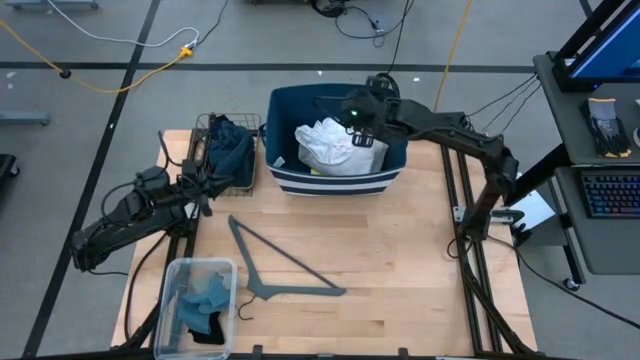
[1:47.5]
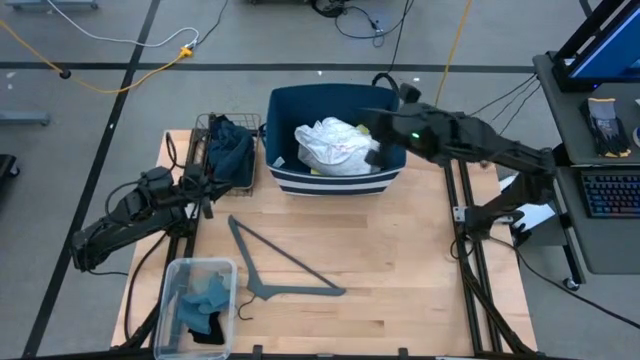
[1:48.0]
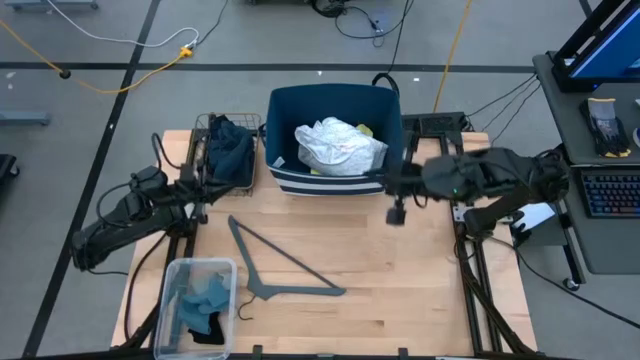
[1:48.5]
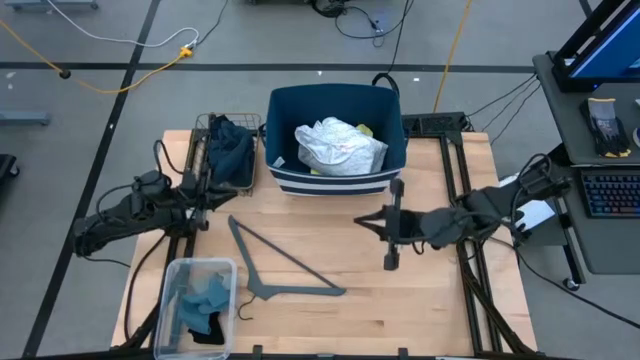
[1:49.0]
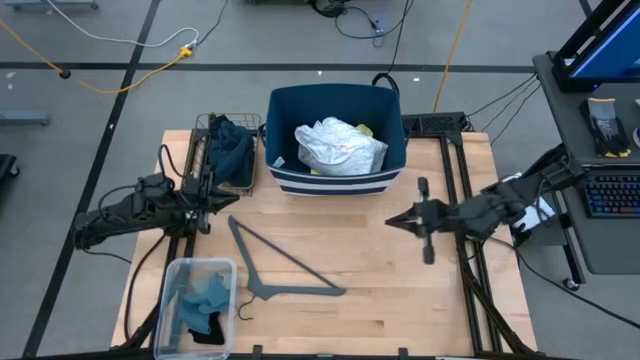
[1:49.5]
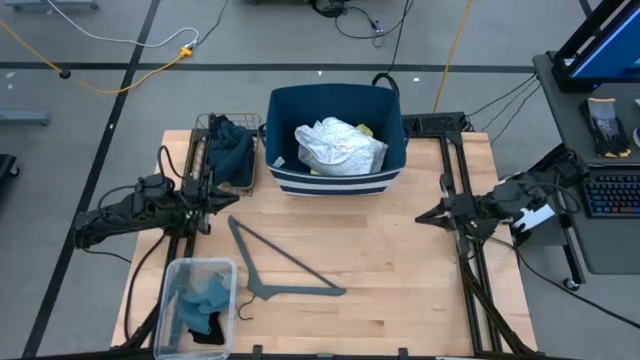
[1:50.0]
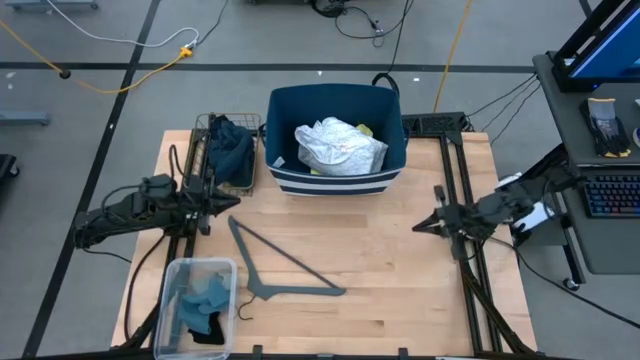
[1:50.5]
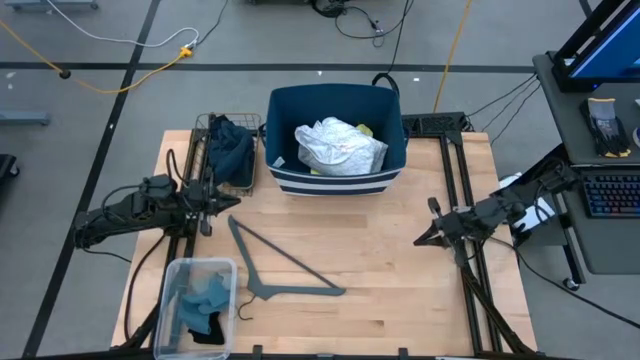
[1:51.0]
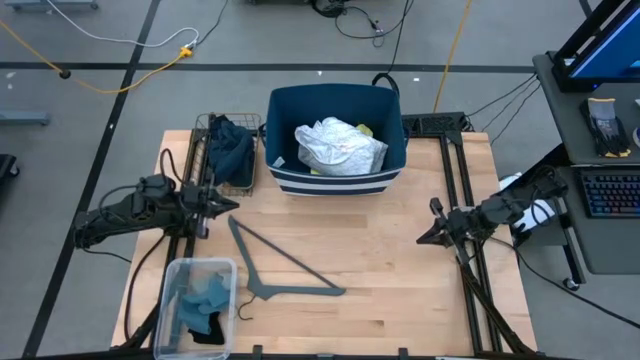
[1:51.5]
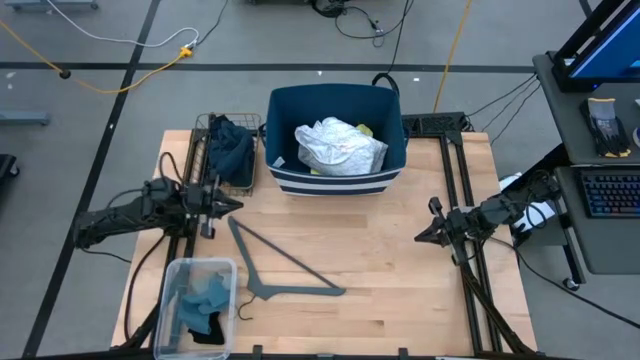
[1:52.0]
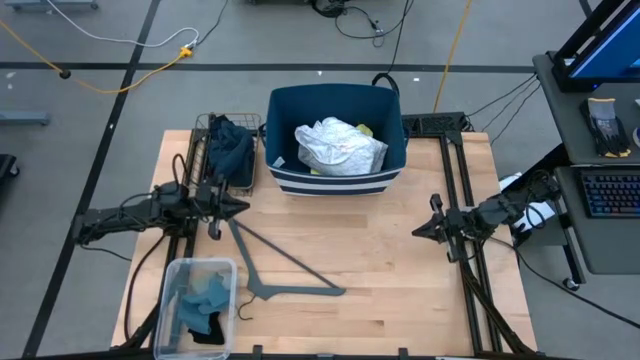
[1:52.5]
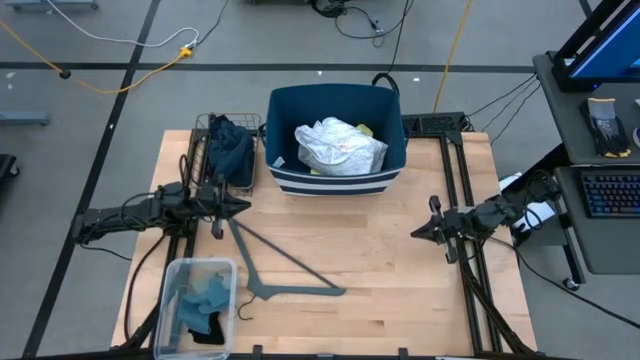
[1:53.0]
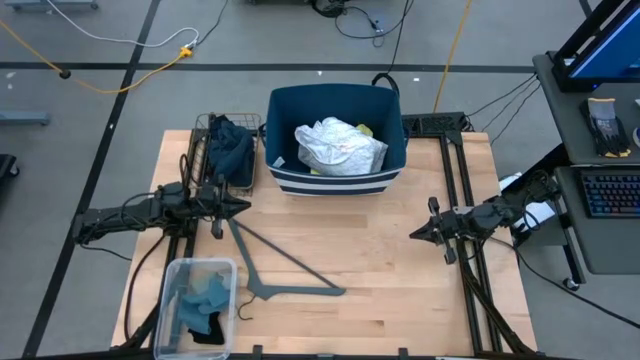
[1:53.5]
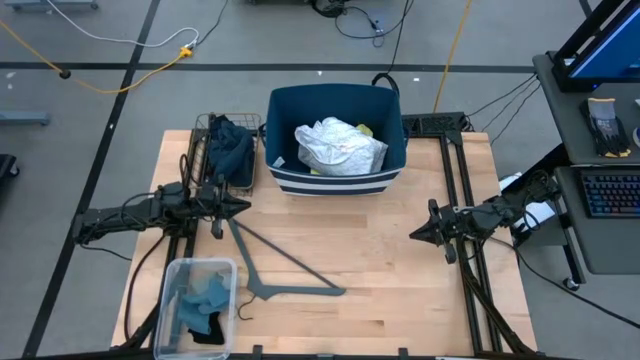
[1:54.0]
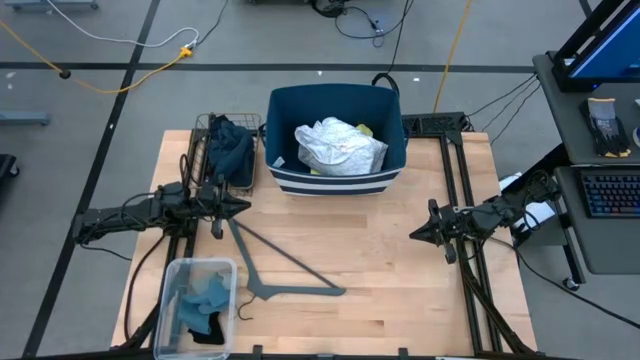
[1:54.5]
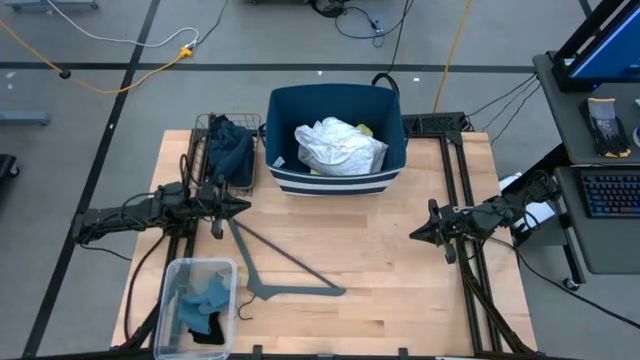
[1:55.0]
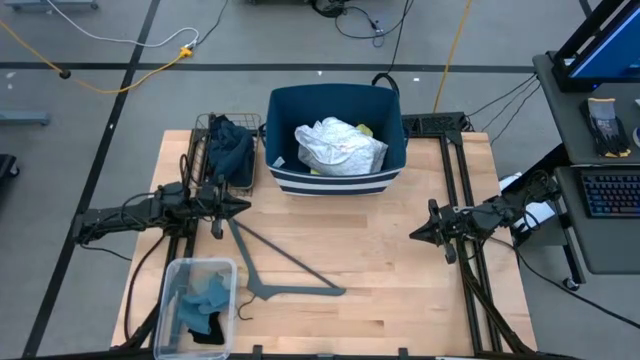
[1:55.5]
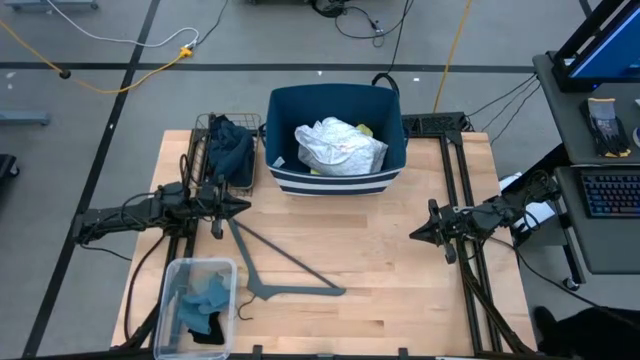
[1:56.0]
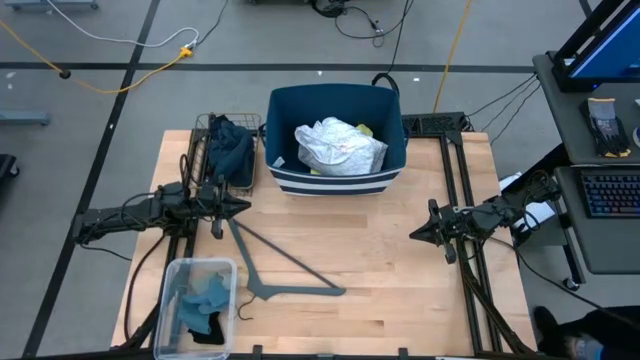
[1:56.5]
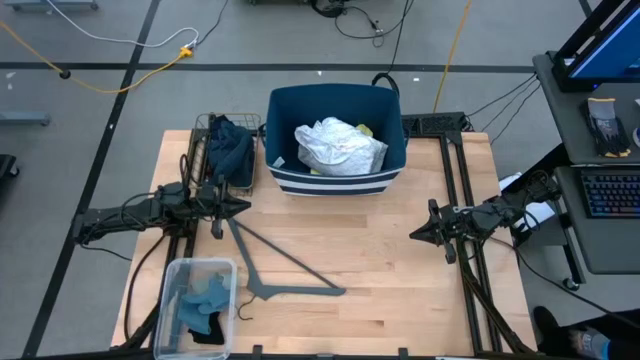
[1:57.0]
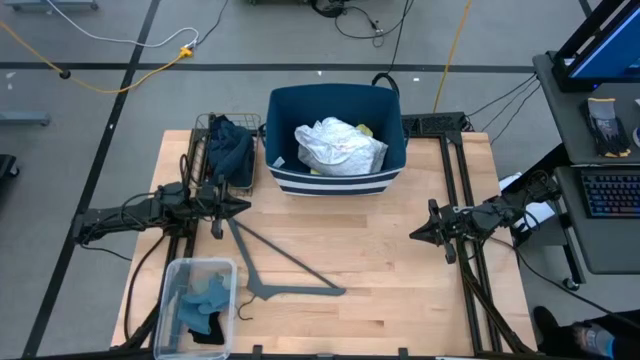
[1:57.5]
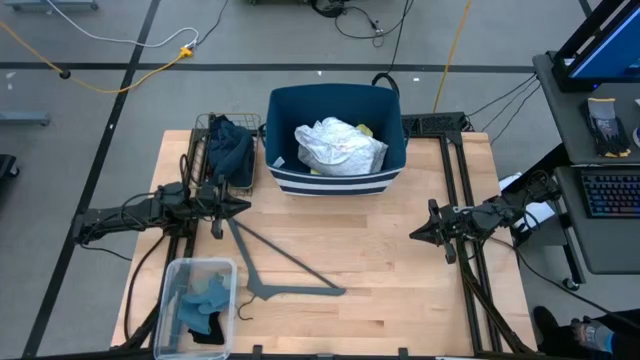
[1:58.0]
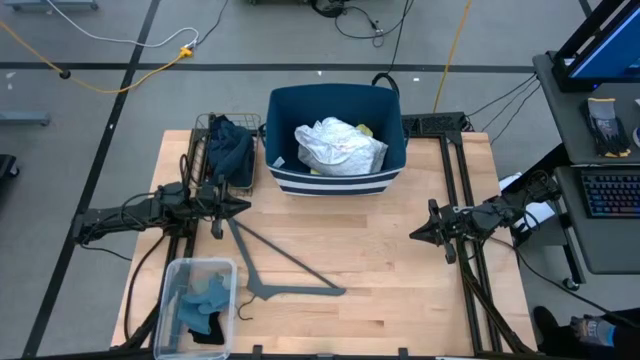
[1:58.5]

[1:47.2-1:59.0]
Task: Pick & Place Cloths
Return to Home Position

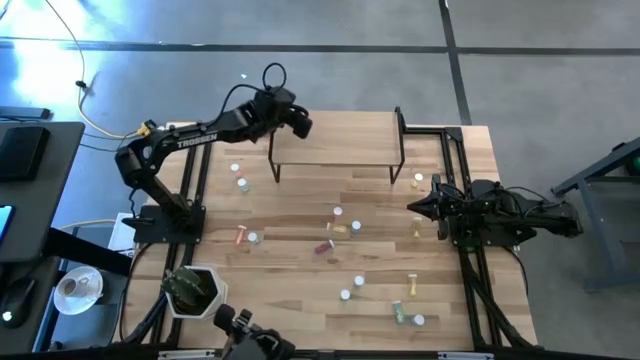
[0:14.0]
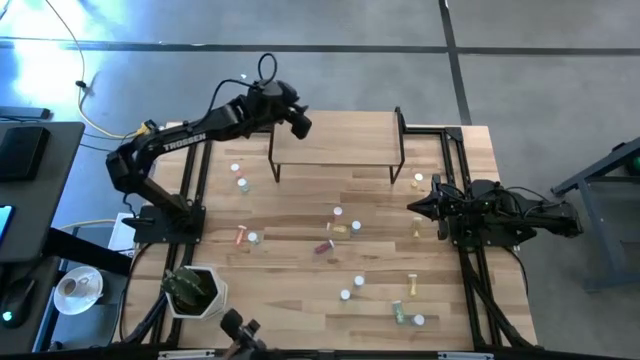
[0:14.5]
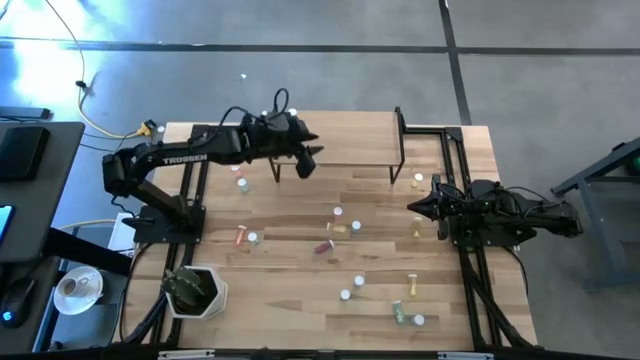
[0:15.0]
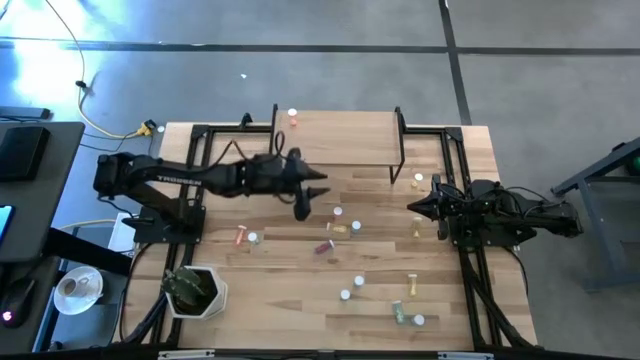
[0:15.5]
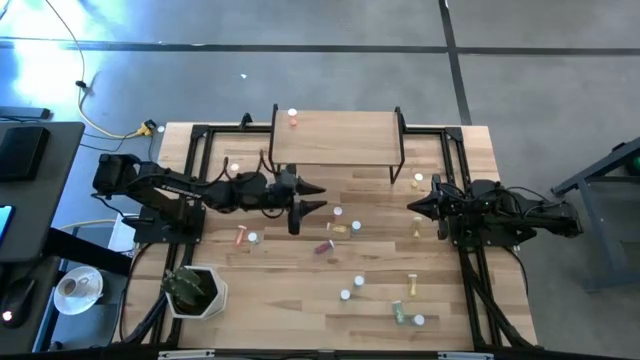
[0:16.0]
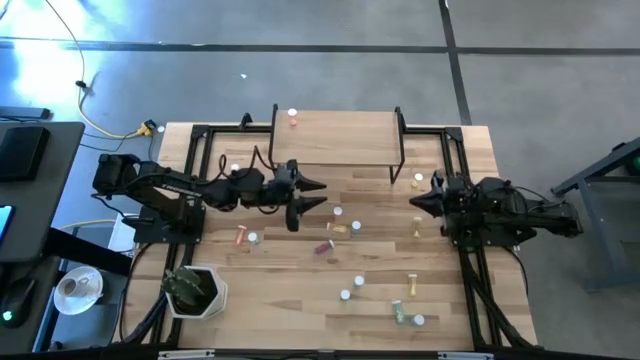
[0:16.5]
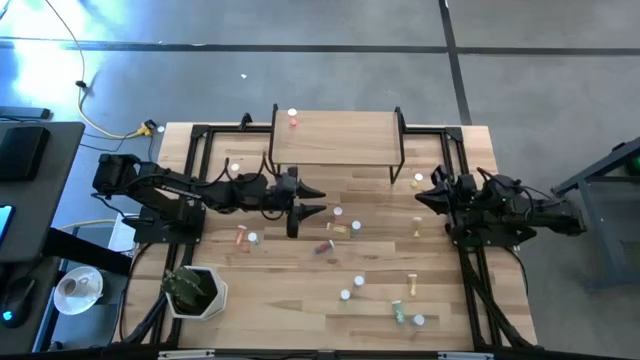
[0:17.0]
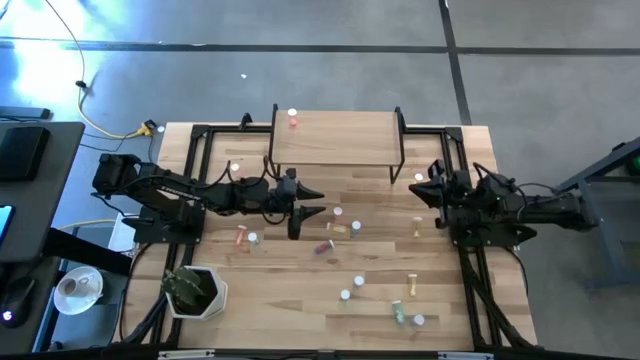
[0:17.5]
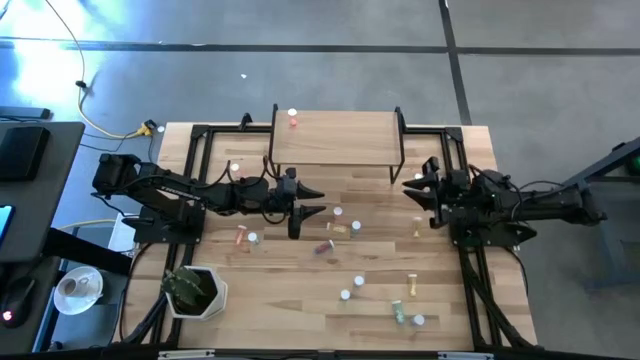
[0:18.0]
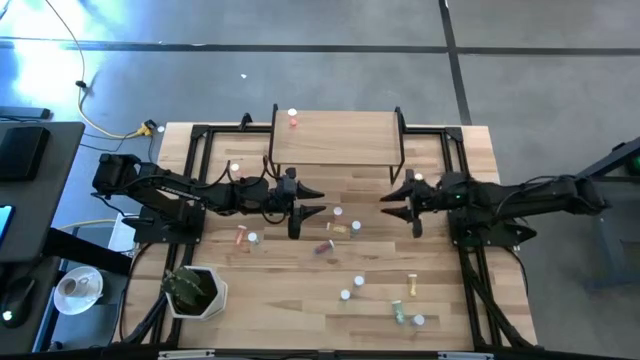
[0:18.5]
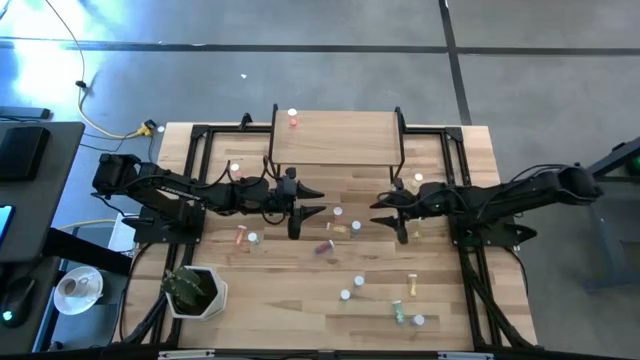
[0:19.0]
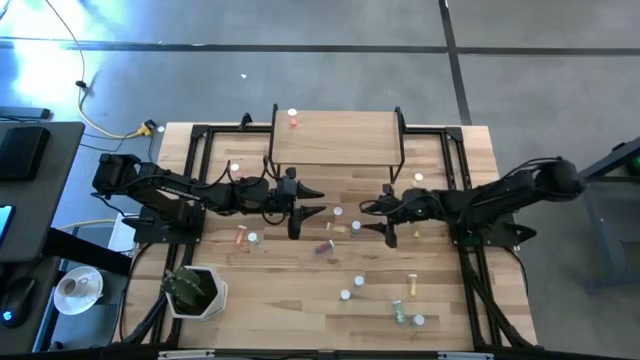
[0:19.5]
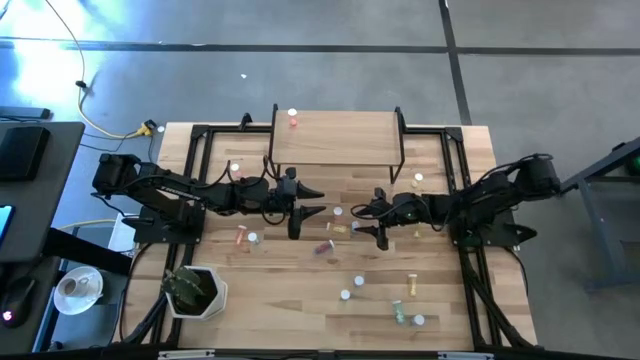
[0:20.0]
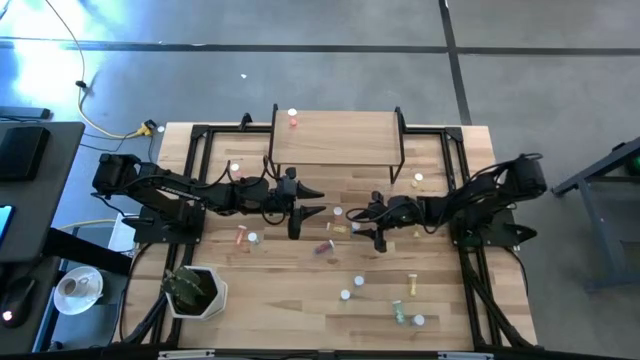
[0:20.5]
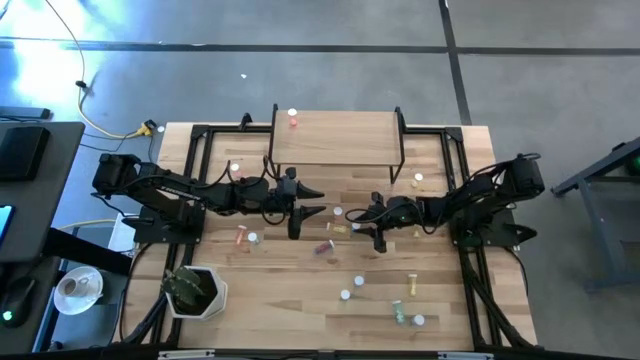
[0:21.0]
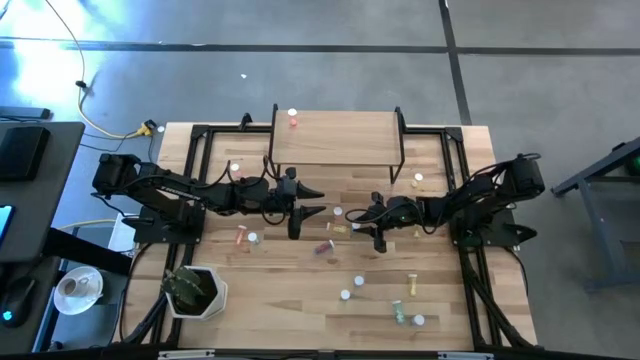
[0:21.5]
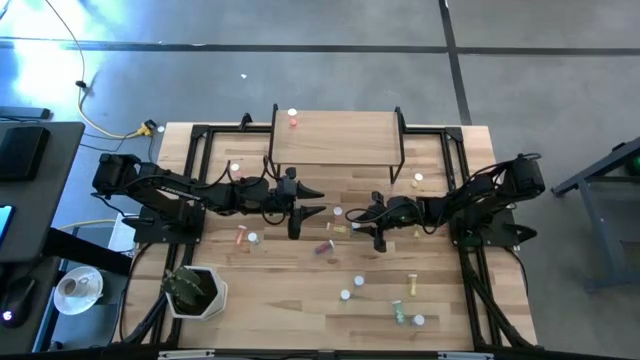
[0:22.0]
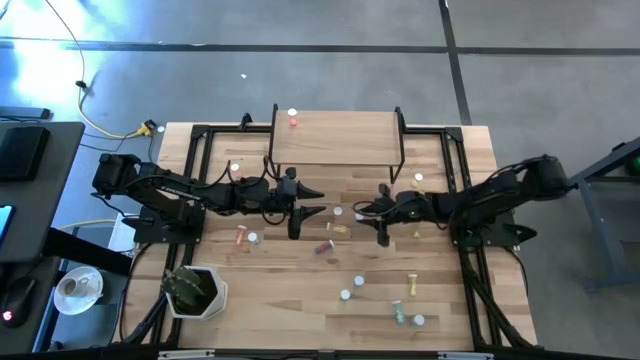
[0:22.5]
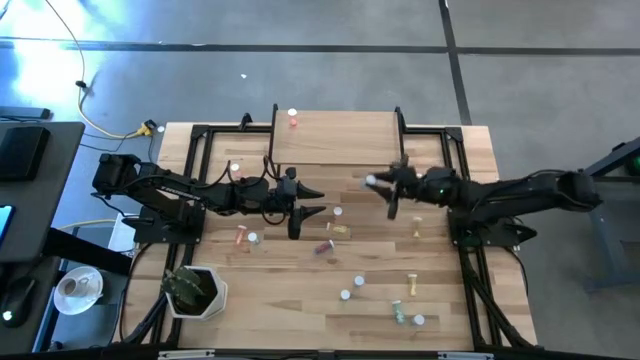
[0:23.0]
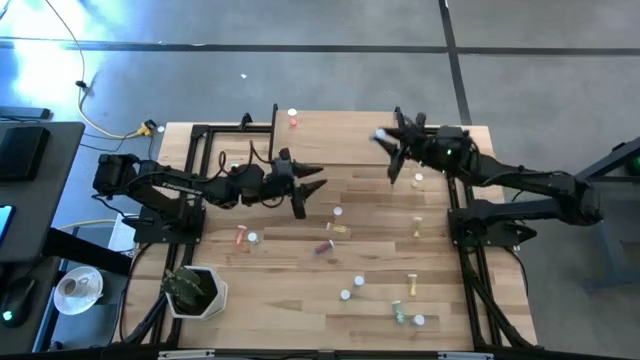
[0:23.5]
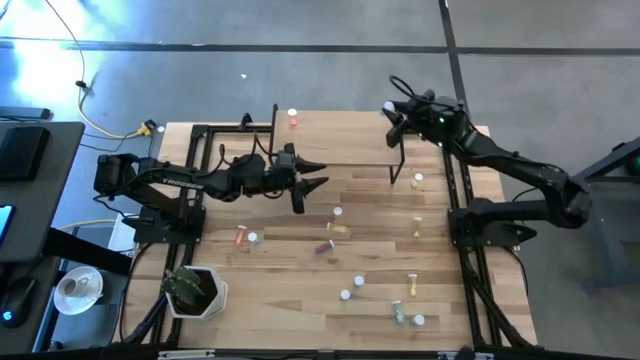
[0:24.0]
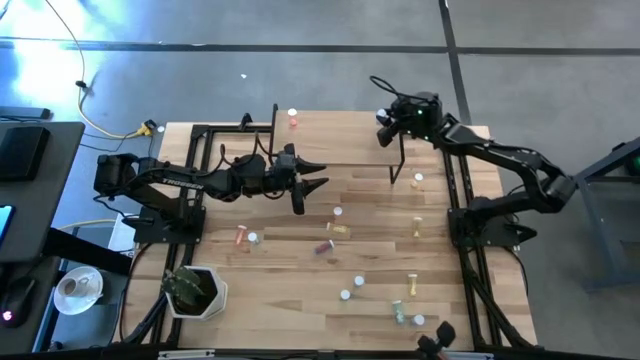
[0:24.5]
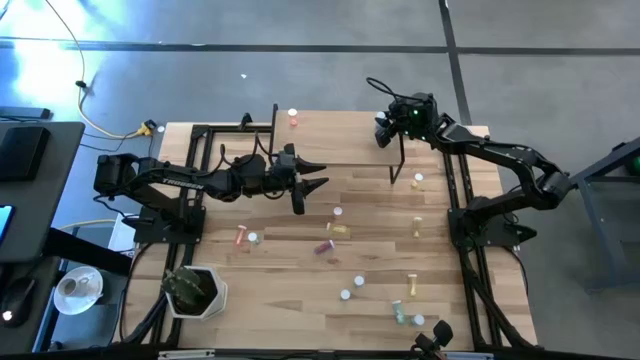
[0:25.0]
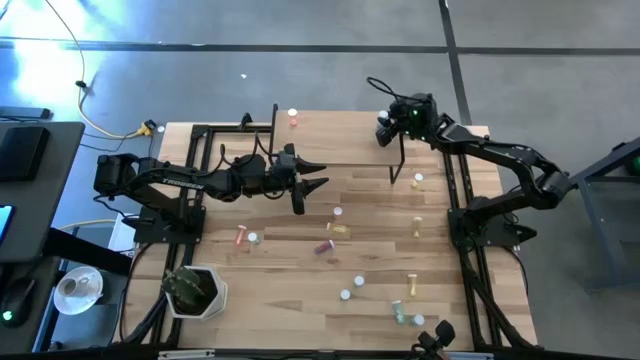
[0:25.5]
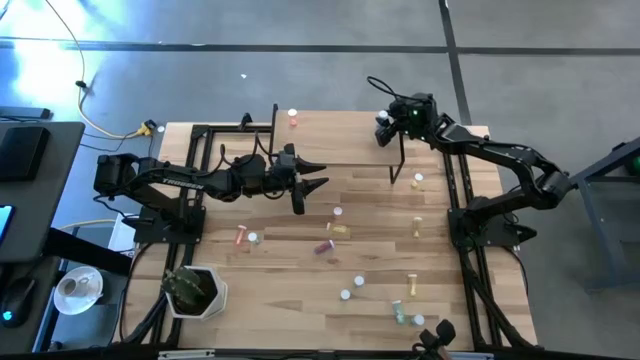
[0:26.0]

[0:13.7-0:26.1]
Task: Pick and place medicine bottles onto shelf by color
Put the blue medicine bottle on the shelf
